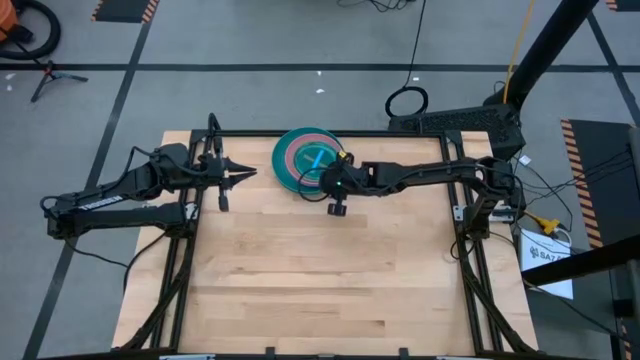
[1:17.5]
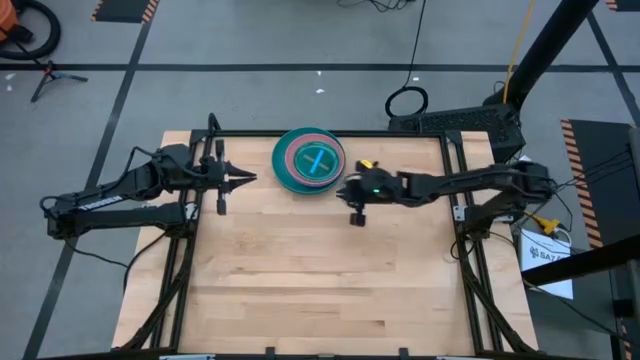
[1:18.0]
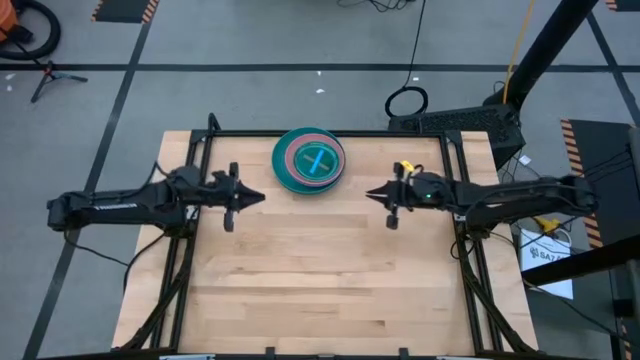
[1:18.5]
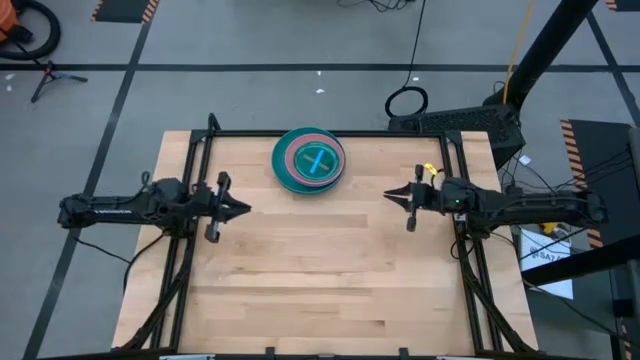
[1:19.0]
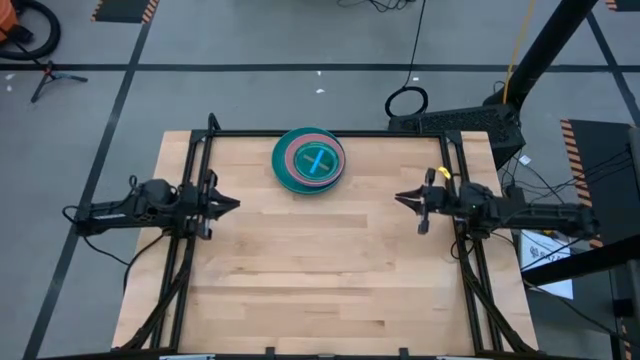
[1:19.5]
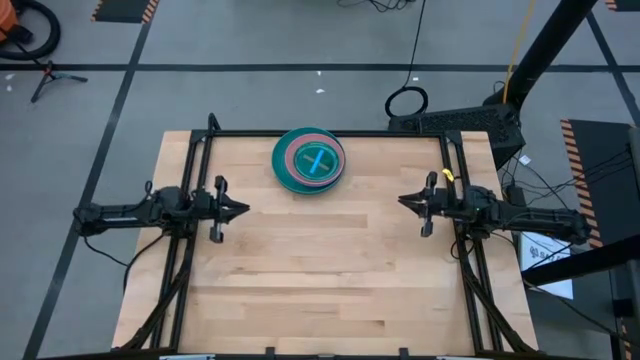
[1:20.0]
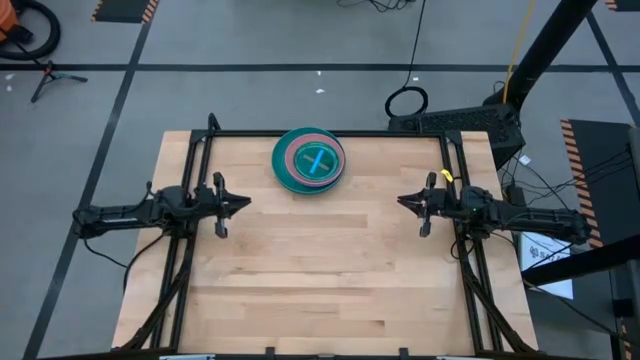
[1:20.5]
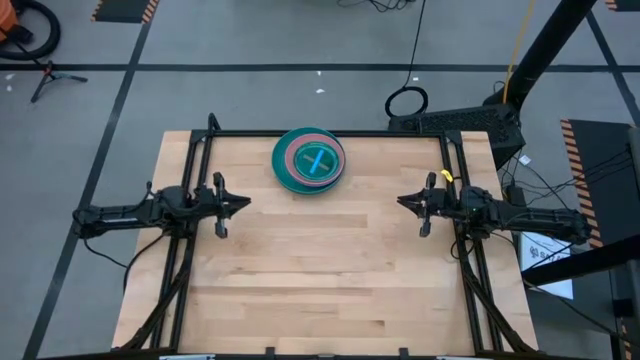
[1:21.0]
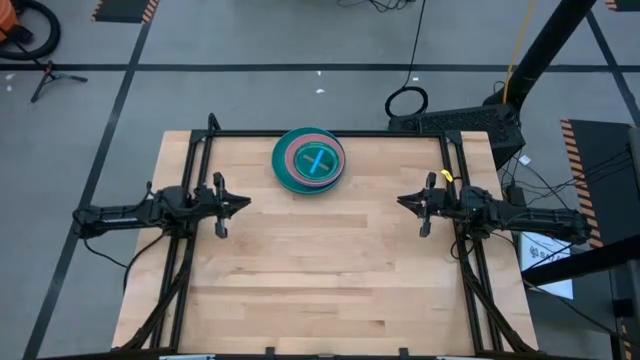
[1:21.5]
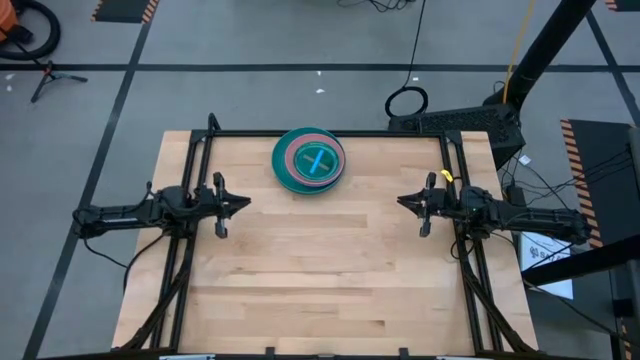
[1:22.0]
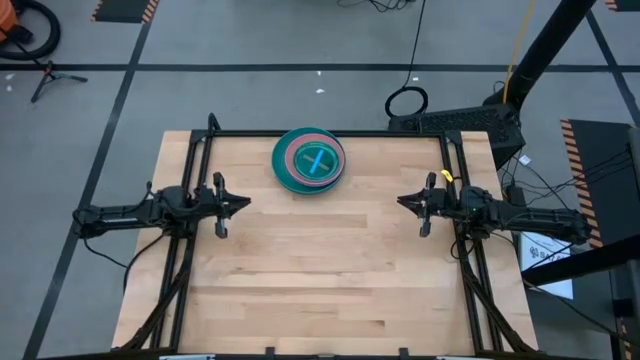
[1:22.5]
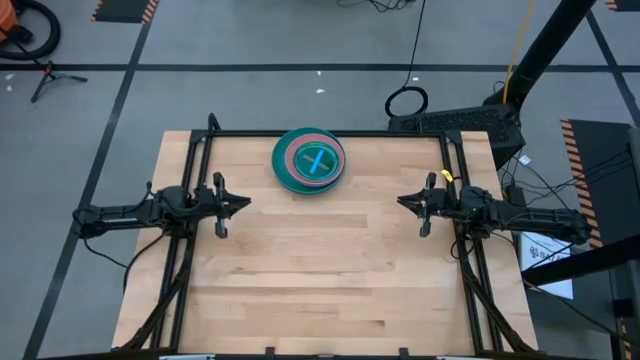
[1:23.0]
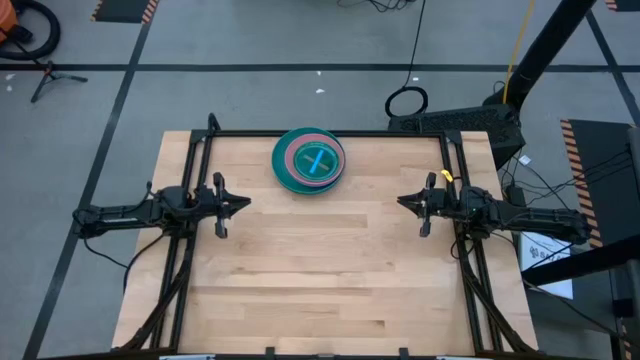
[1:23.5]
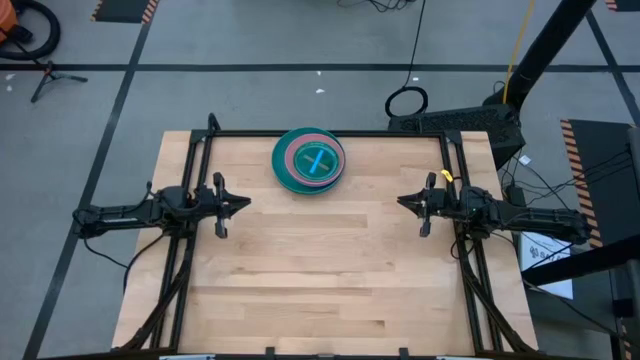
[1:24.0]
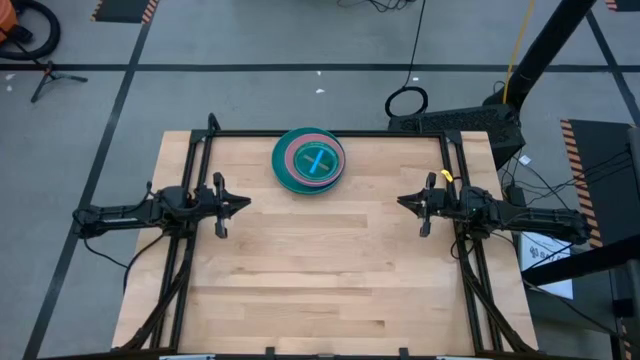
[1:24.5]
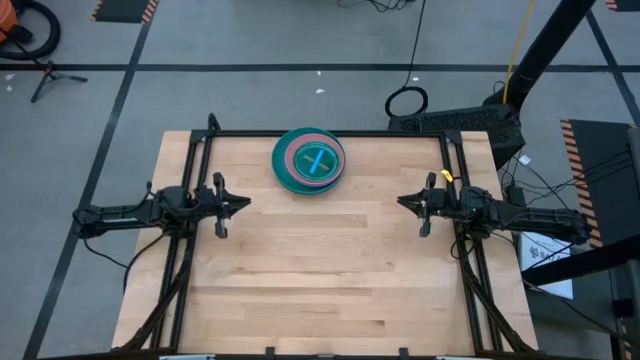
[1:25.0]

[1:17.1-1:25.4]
Task: Stack plastic plates
Return to Home Position

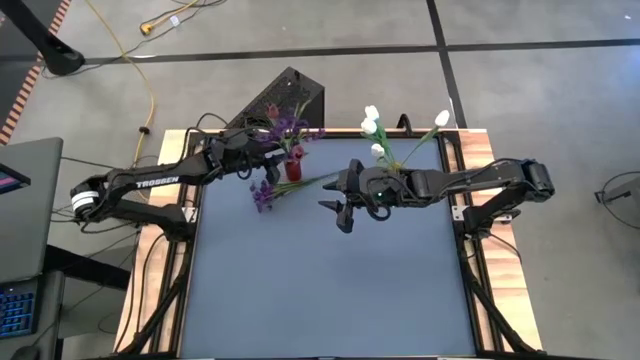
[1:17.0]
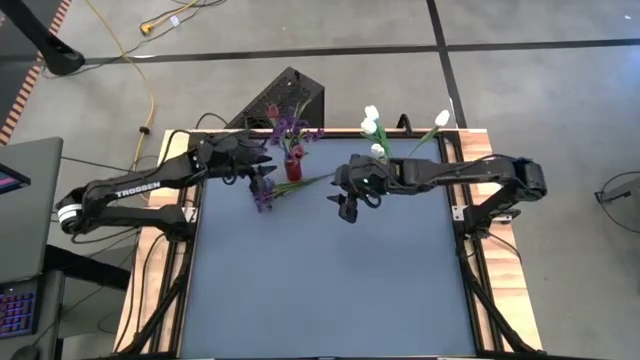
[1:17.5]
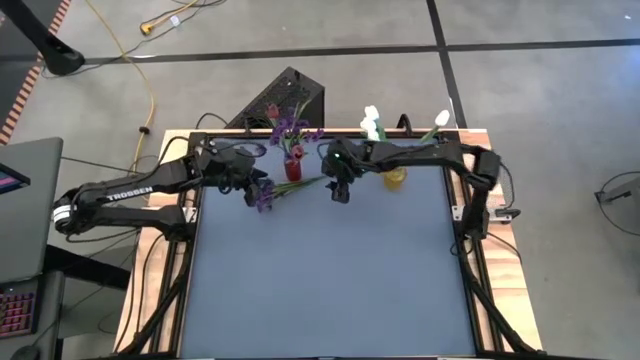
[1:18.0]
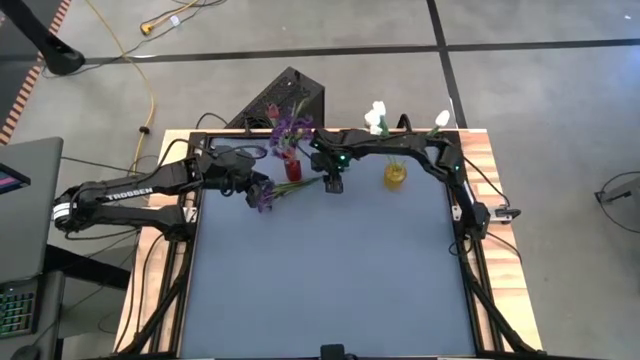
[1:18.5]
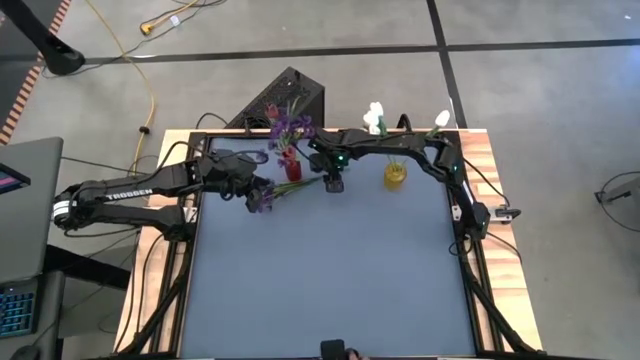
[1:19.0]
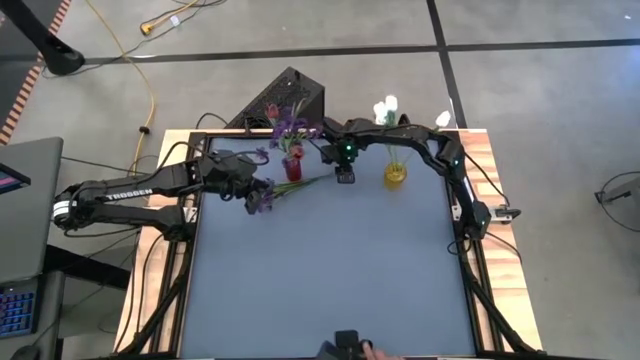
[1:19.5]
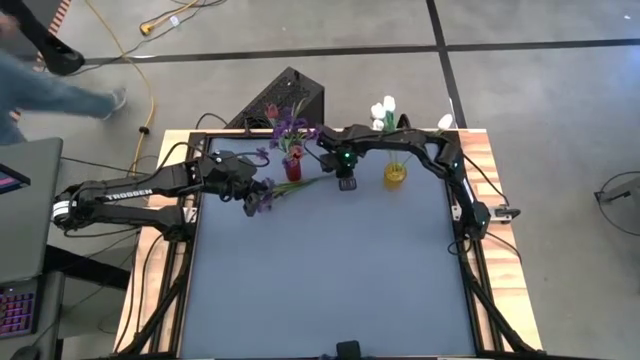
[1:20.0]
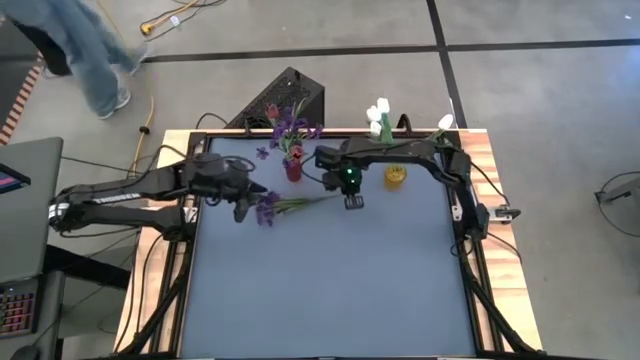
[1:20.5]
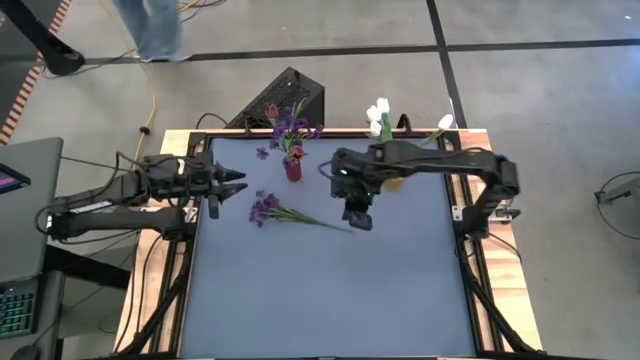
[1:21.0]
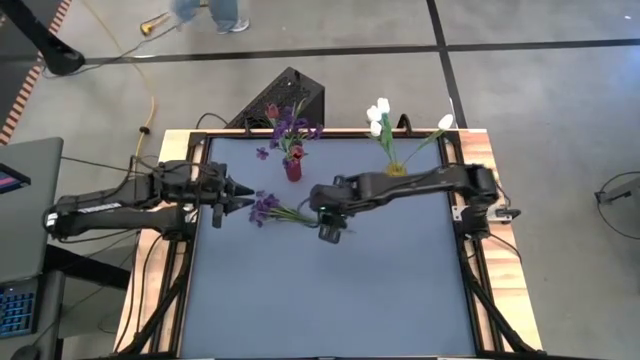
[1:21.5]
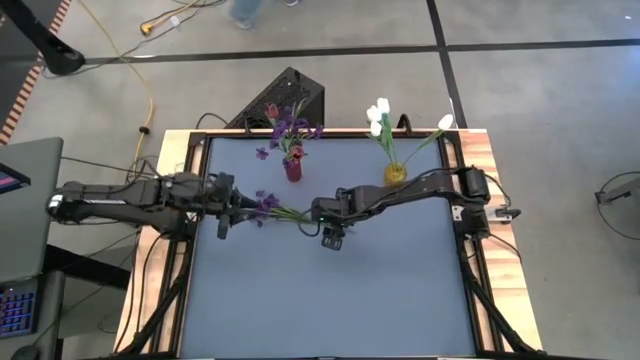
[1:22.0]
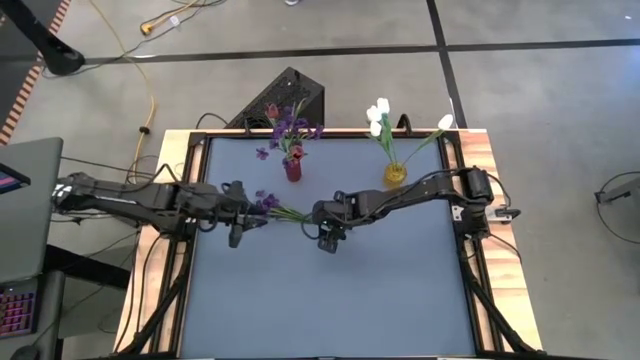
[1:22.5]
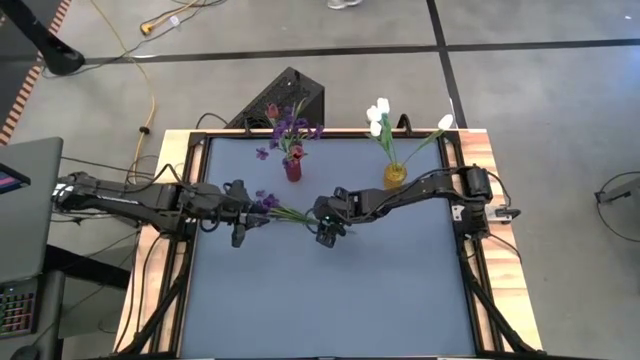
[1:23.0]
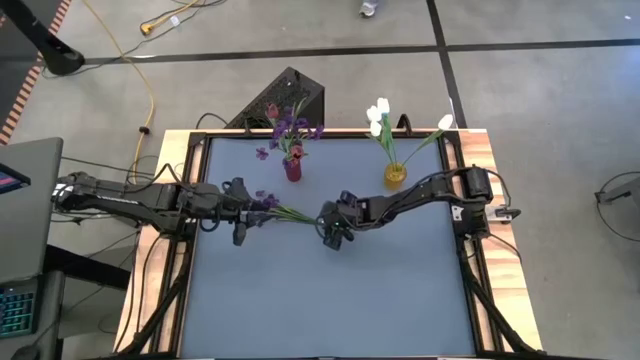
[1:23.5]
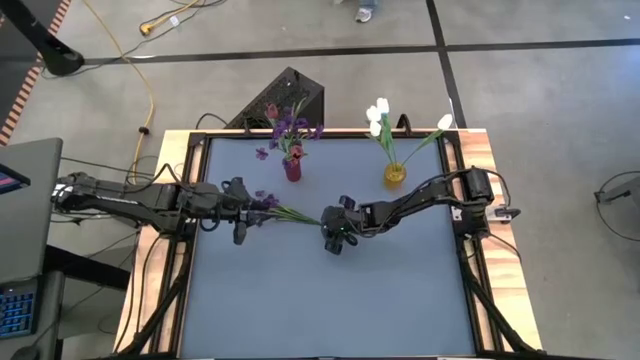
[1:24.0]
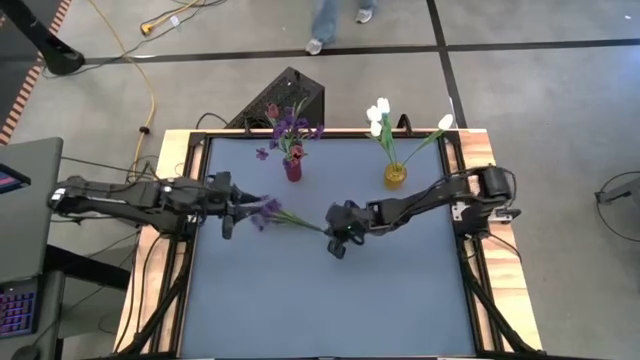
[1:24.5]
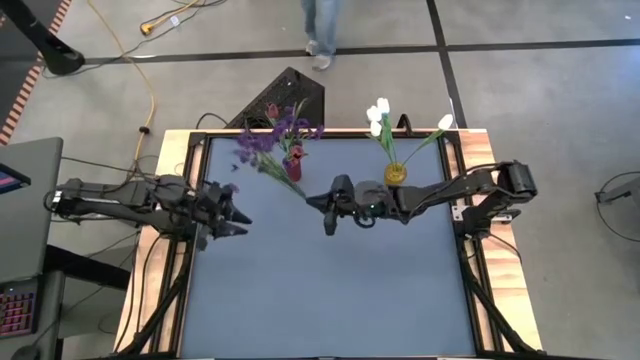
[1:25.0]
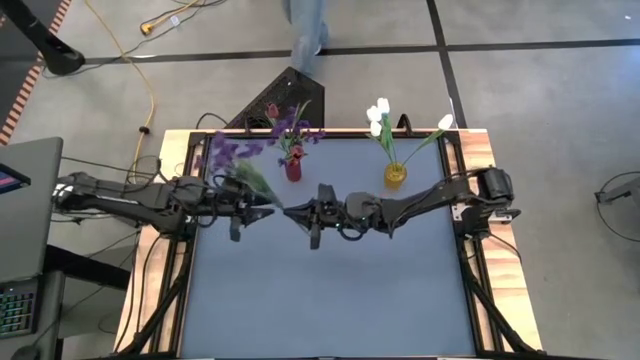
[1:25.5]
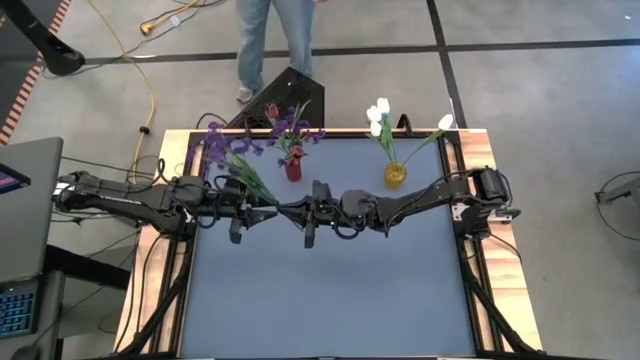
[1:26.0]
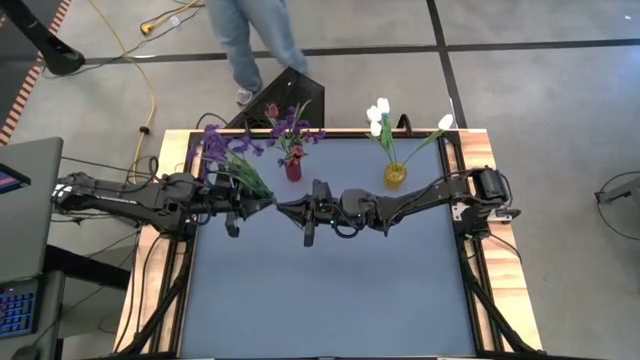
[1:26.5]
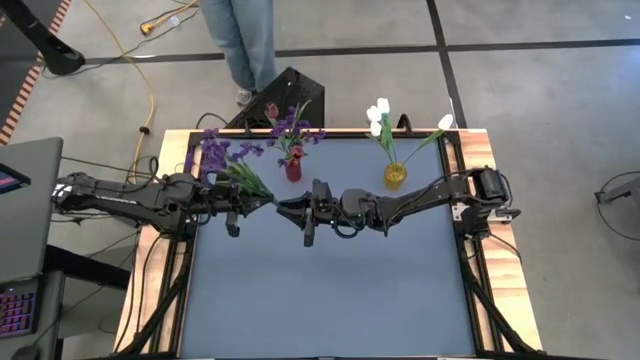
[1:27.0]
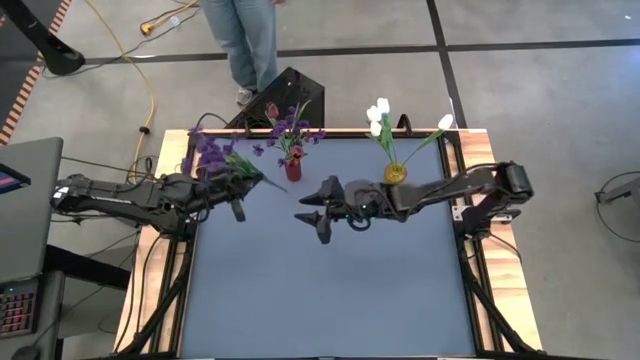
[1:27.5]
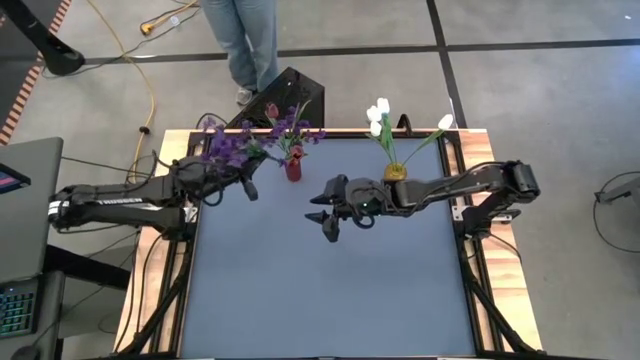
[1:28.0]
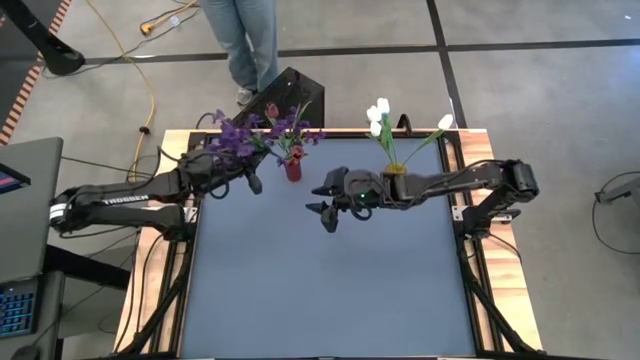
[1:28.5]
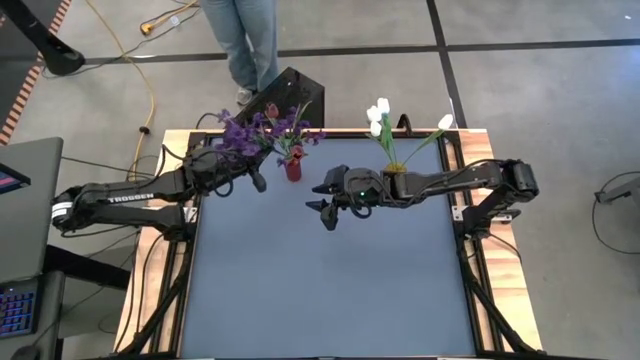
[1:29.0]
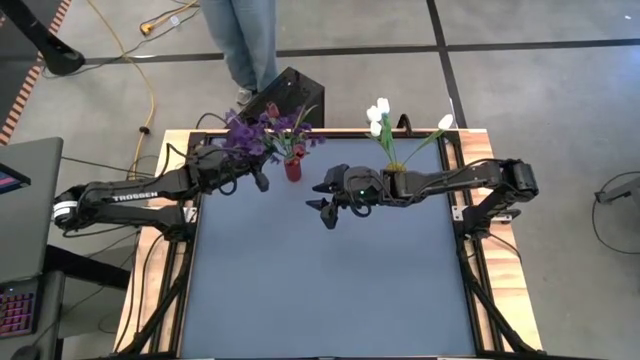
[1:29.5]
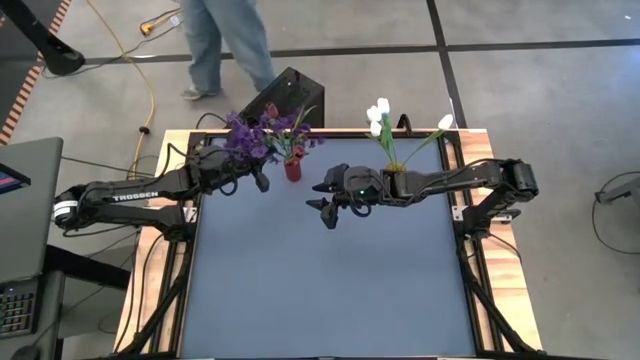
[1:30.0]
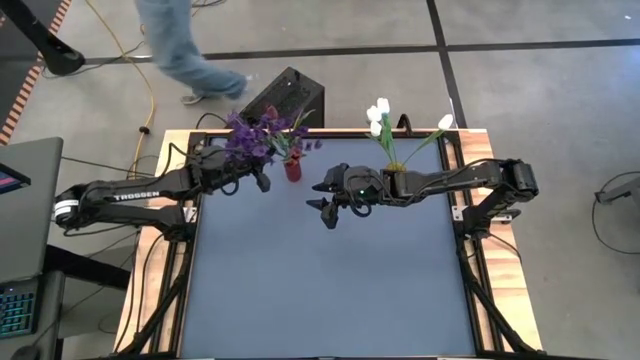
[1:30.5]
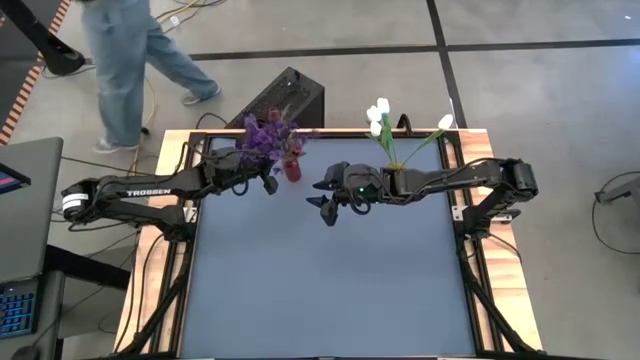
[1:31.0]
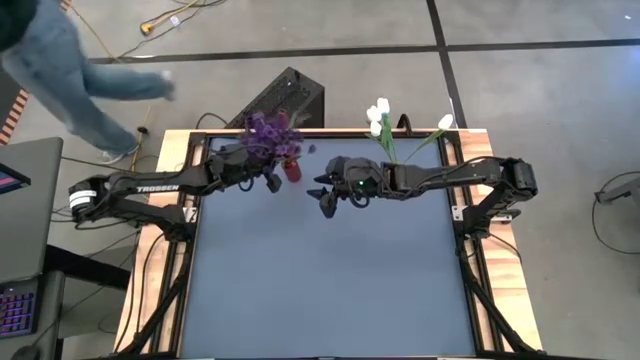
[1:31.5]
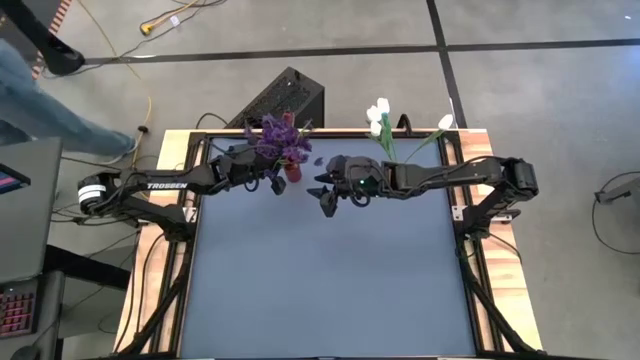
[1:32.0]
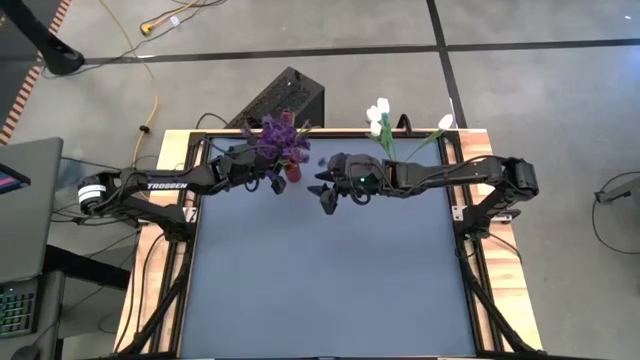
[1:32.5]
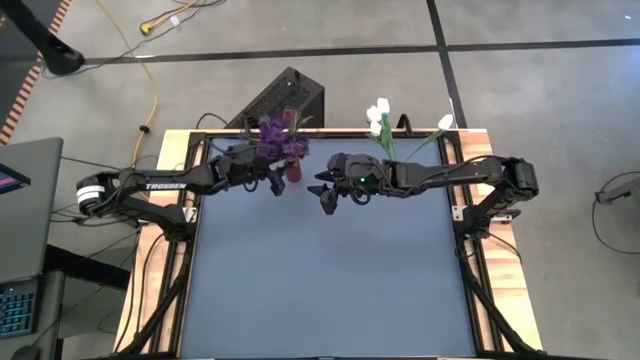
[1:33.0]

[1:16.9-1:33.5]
Task: Sort flowers into vase by color
Put the purple flowers into the red vase
